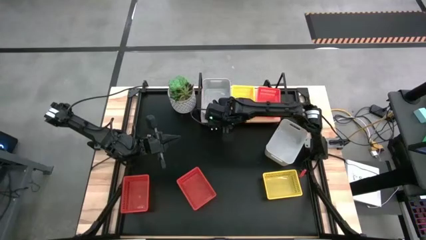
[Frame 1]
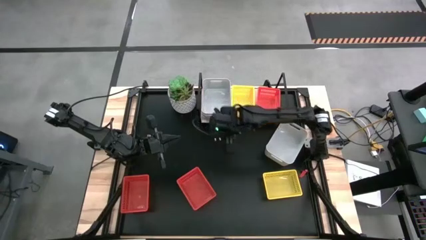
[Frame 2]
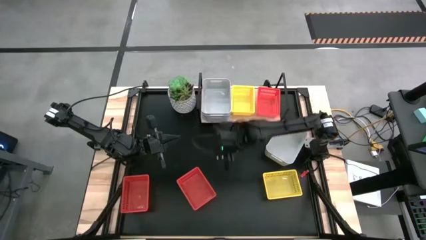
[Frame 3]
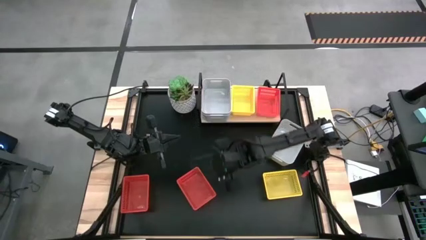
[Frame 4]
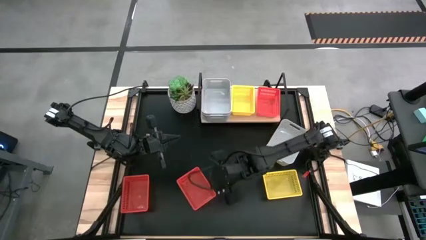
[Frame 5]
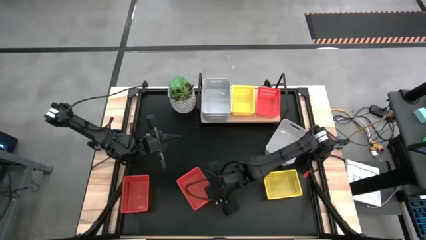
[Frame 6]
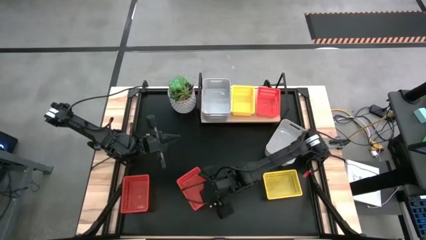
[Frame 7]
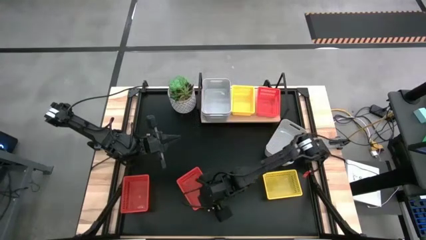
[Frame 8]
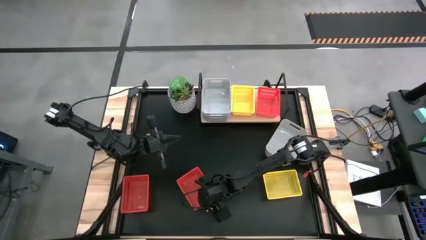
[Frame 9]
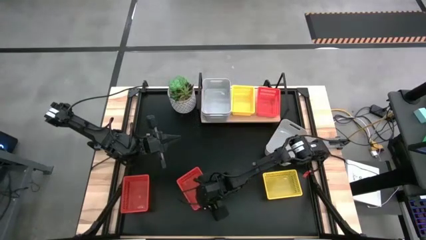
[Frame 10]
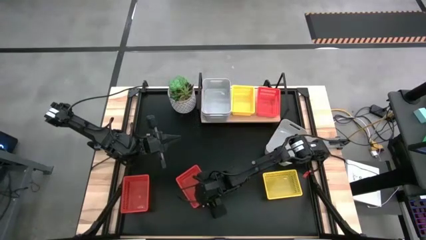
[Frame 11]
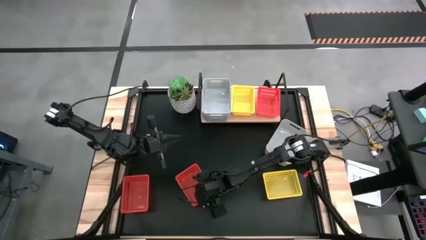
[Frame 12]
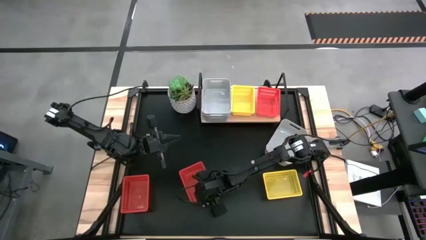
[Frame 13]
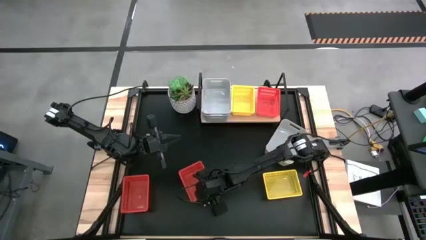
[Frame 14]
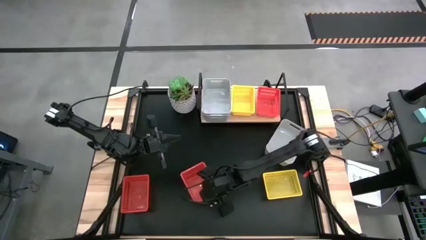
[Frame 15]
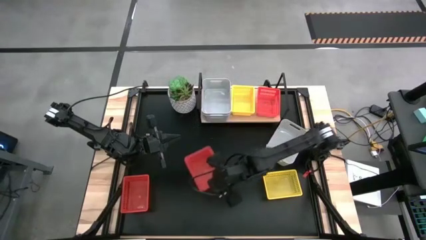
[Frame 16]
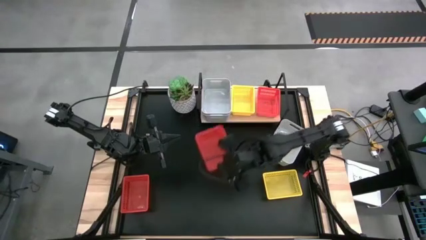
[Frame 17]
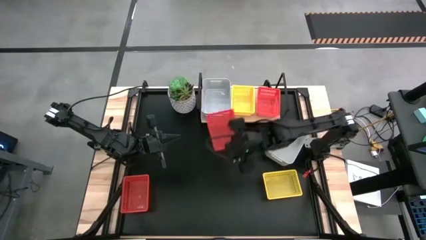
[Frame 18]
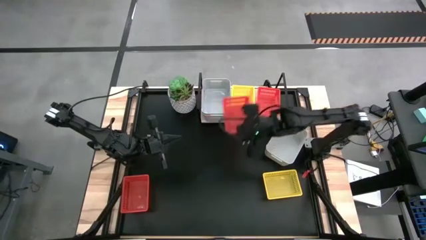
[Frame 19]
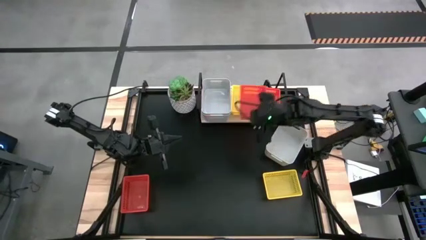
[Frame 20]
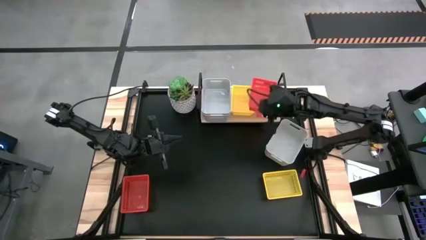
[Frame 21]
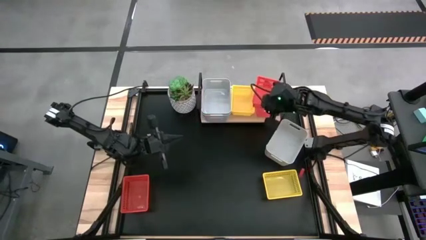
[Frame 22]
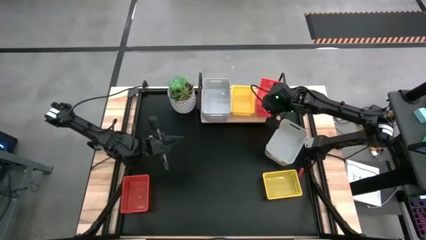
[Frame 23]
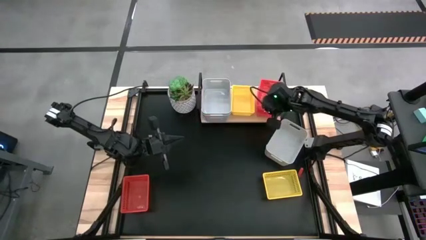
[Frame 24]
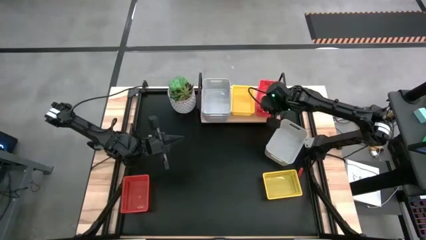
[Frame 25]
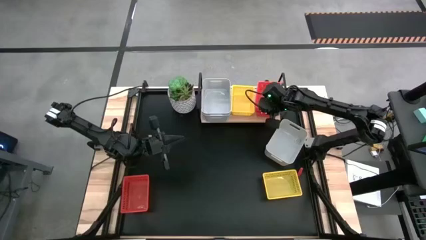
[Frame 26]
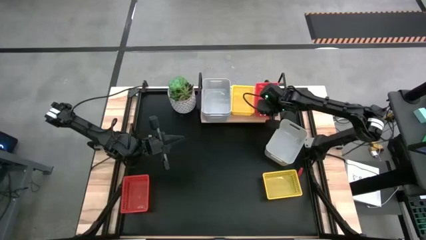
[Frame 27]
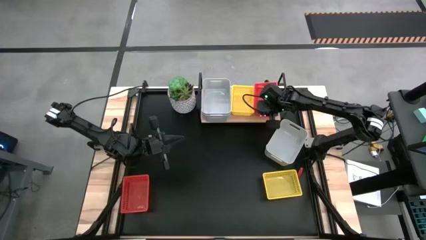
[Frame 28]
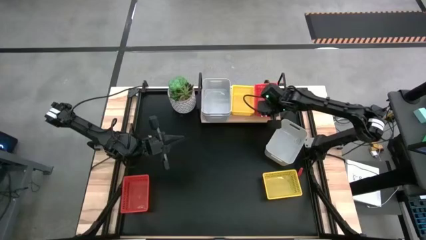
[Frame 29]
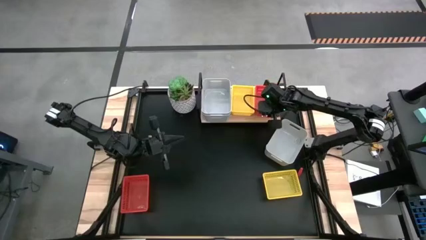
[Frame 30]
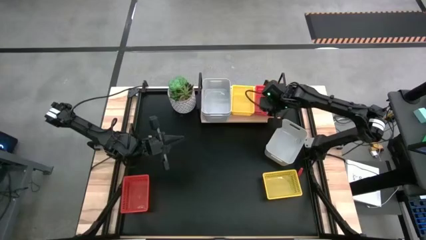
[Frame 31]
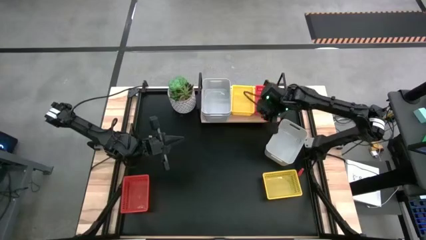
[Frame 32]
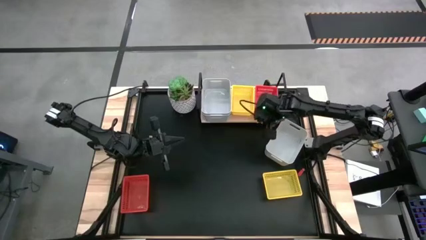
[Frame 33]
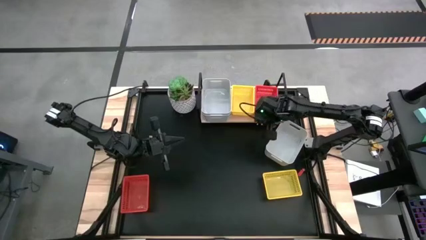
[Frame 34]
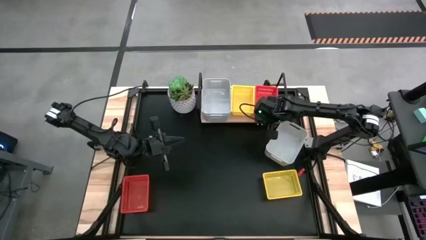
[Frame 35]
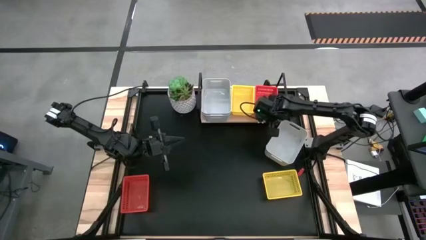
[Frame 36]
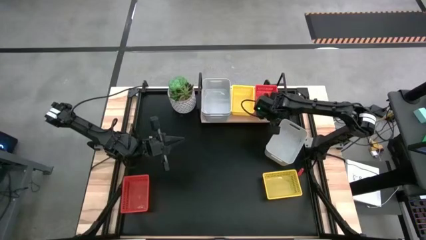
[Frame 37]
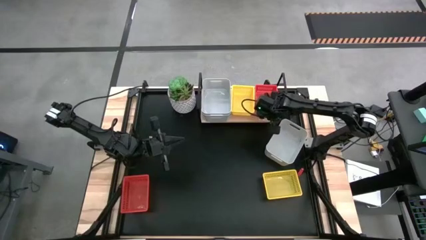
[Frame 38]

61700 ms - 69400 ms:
Task: Stack baskets on shelf by color
Stack the right red bin on the red bin on the shelf

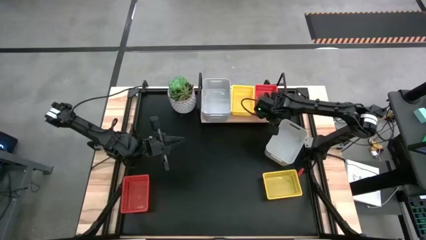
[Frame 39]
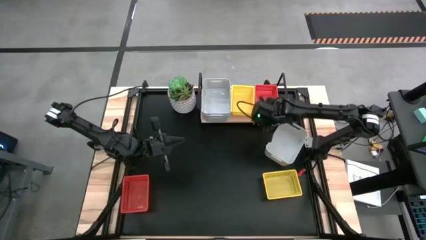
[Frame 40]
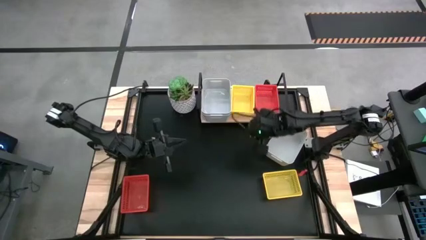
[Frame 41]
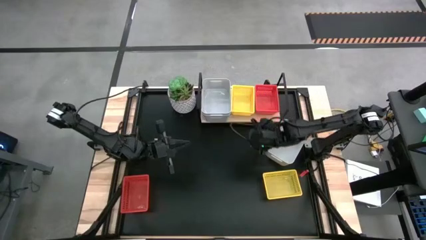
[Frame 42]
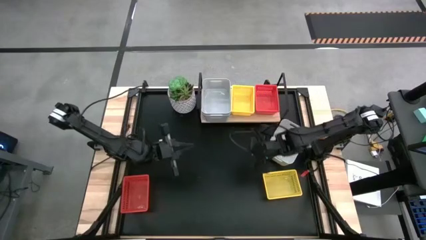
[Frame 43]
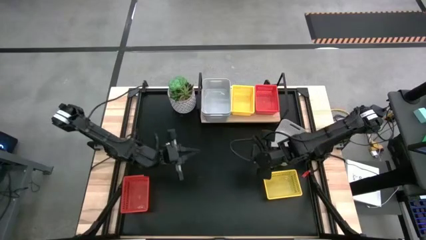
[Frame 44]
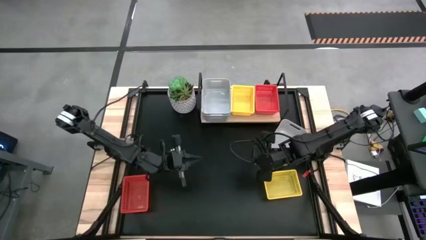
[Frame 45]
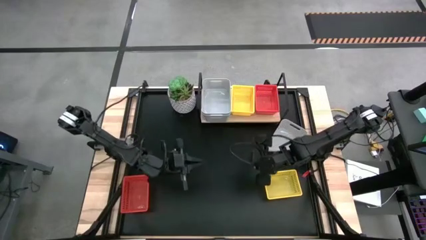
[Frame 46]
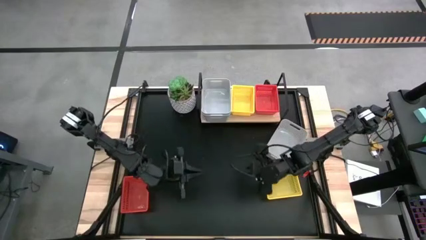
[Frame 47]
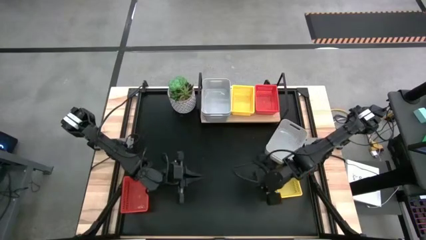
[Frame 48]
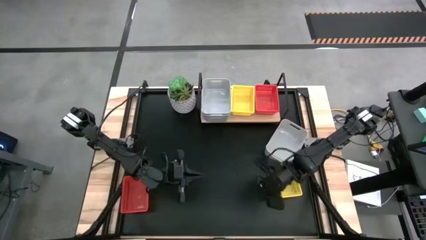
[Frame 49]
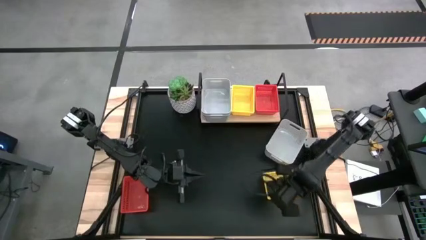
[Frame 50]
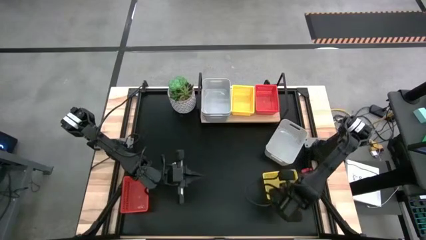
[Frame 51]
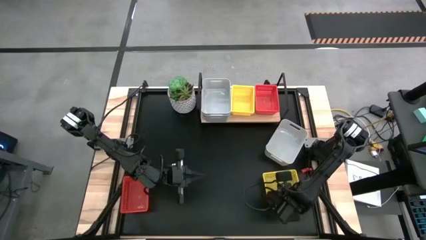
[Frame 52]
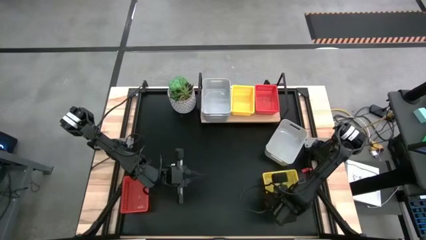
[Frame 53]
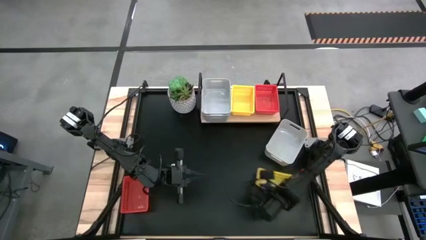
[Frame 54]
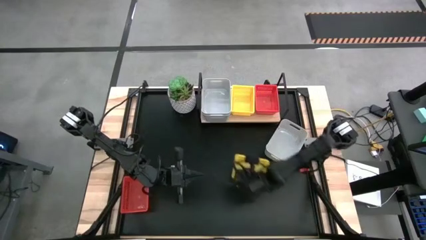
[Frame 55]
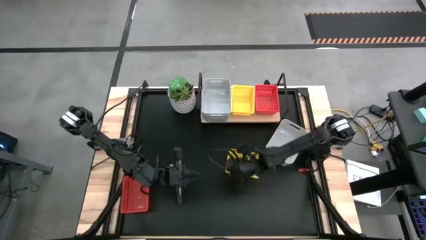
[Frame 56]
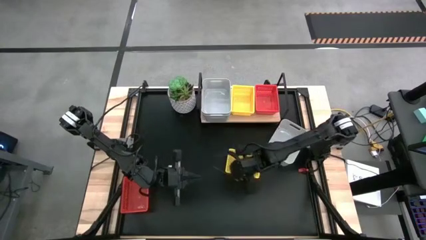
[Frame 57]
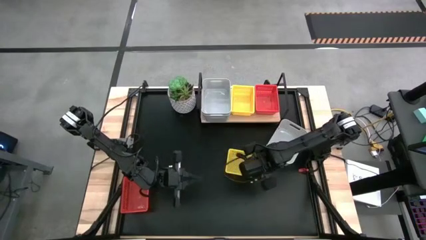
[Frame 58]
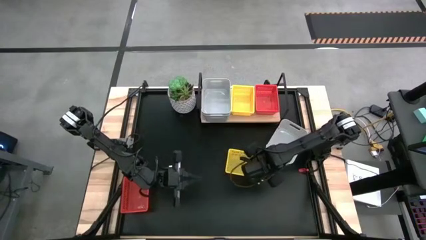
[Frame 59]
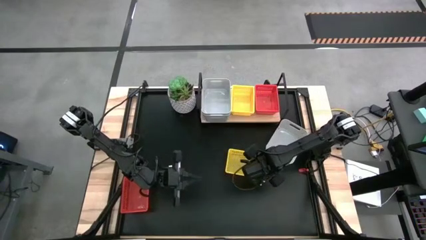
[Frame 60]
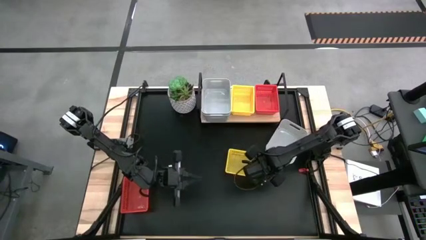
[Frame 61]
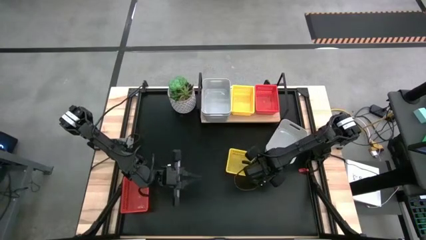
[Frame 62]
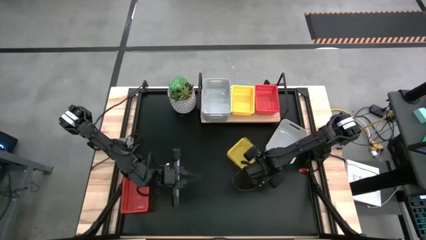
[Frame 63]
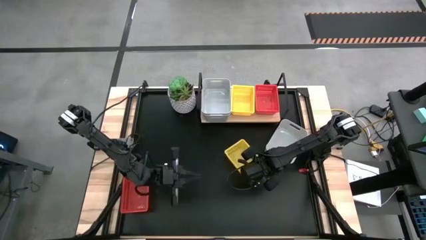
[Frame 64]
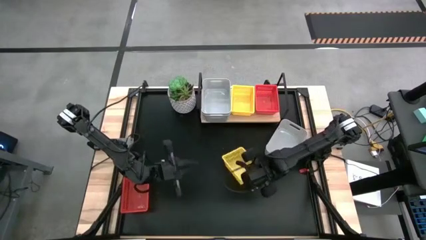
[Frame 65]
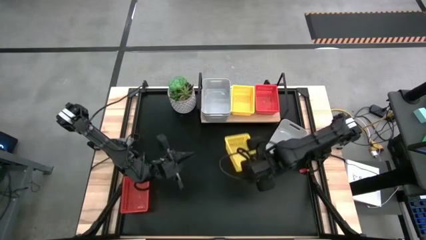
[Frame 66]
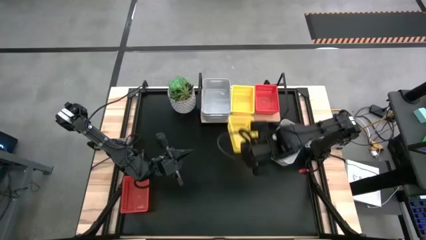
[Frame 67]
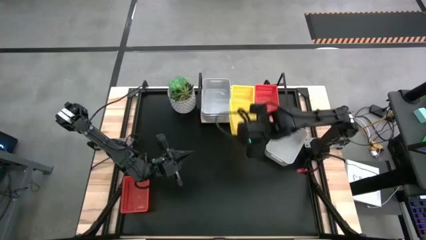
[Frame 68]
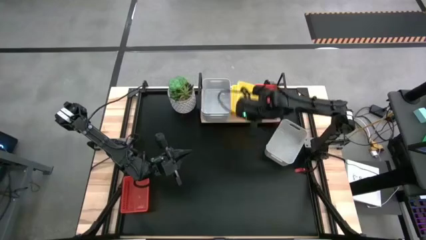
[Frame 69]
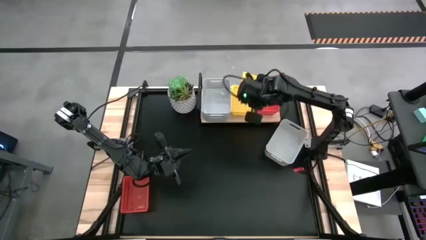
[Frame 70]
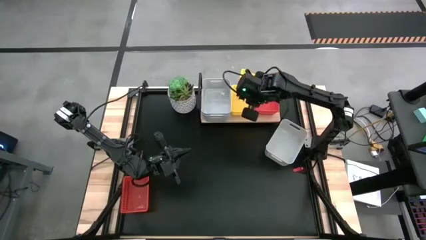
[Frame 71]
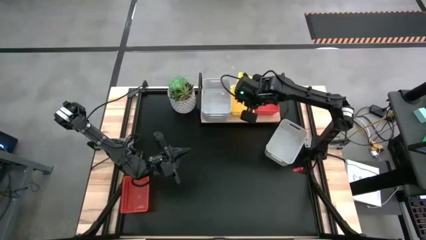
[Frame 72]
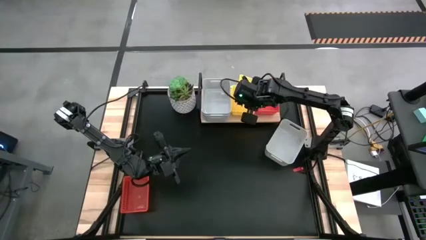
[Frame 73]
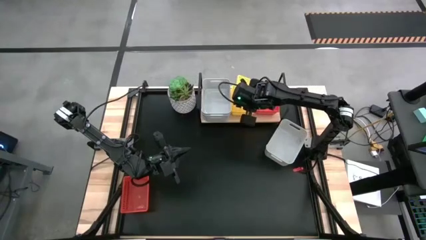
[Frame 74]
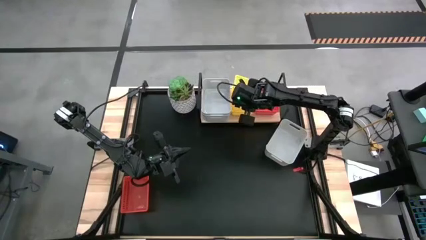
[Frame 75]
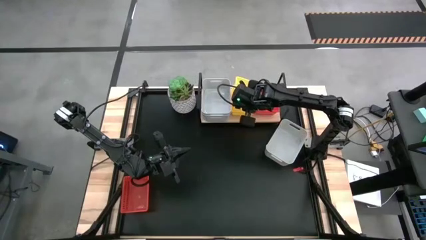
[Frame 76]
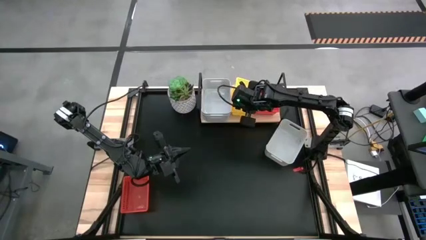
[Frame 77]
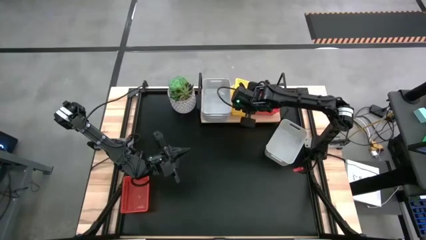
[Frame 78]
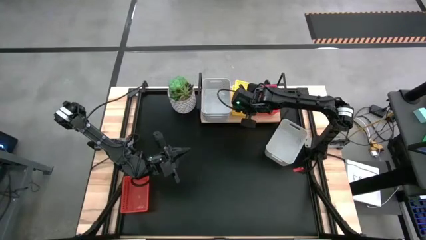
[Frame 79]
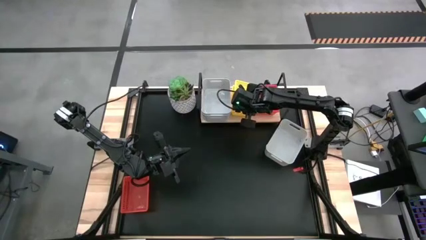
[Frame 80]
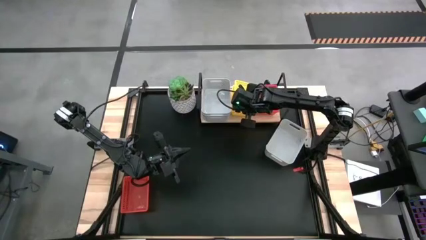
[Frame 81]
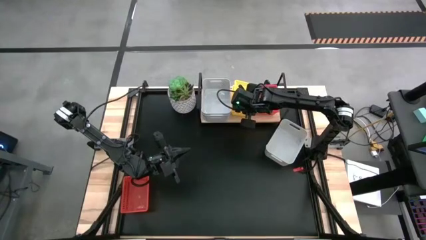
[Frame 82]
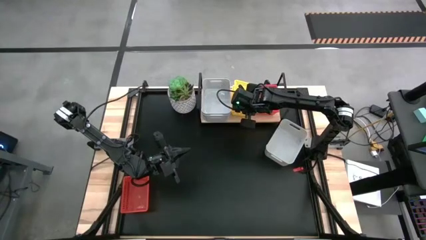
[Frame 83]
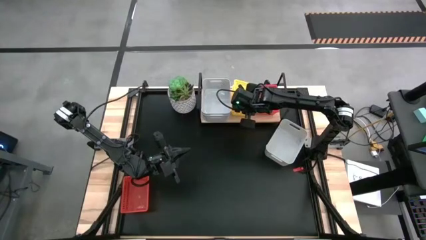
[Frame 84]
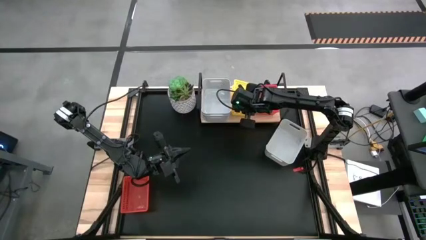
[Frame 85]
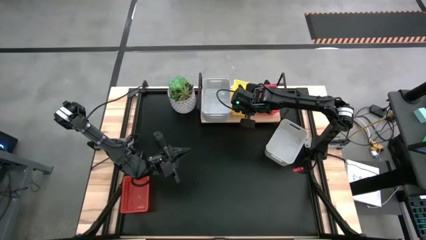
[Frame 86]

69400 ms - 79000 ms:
Stack the yellow bin on the yellow bin on the shelf
